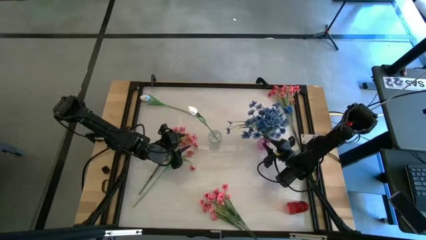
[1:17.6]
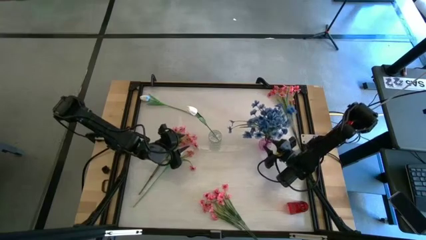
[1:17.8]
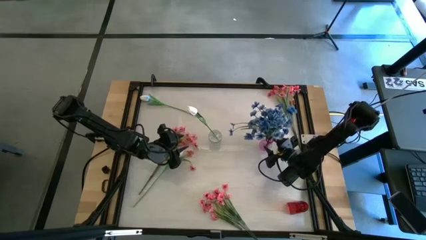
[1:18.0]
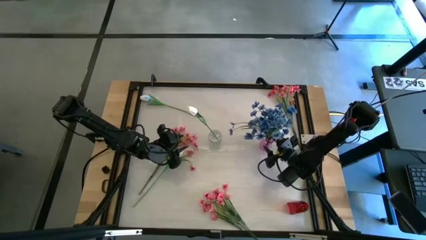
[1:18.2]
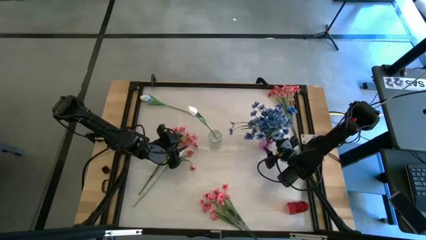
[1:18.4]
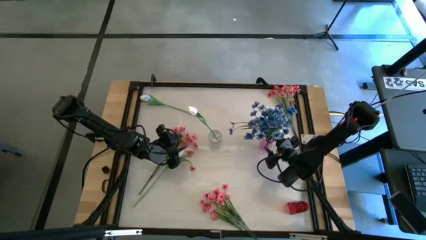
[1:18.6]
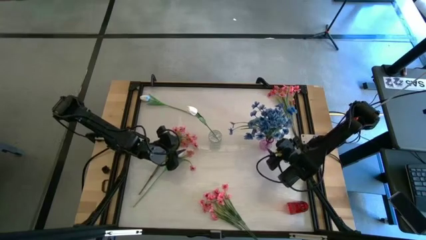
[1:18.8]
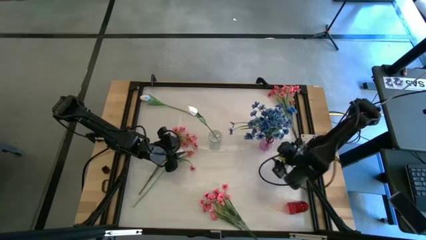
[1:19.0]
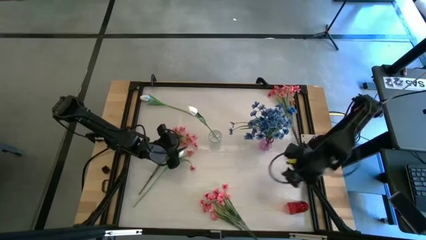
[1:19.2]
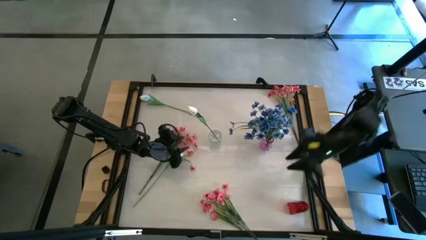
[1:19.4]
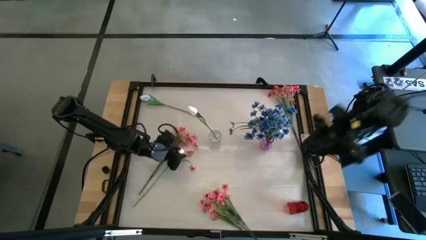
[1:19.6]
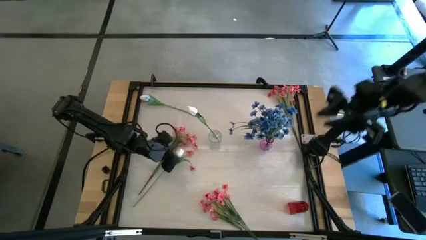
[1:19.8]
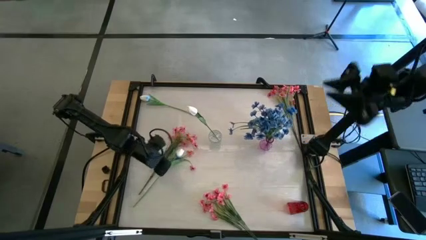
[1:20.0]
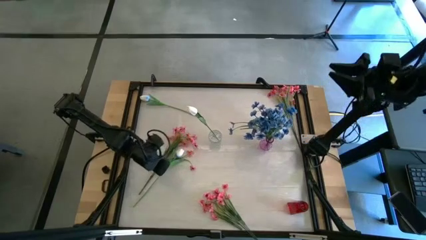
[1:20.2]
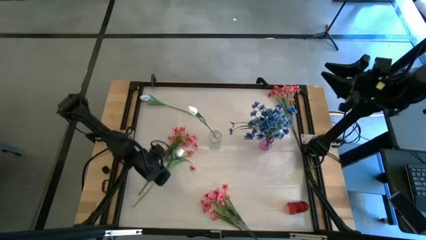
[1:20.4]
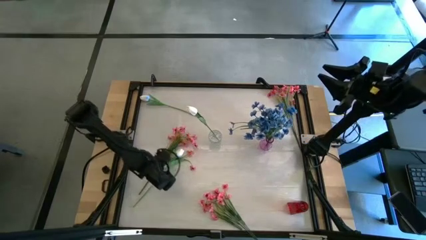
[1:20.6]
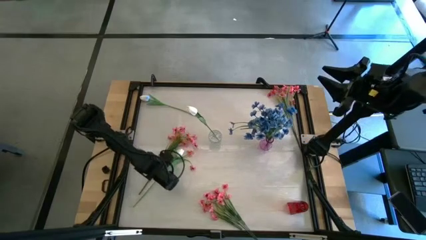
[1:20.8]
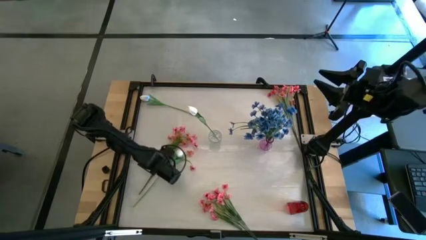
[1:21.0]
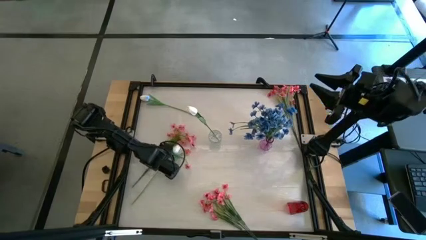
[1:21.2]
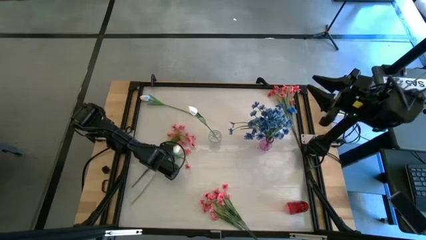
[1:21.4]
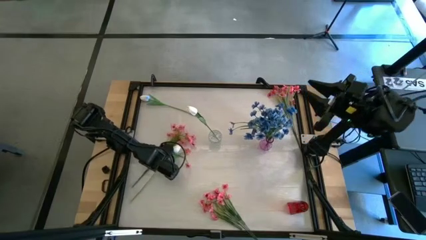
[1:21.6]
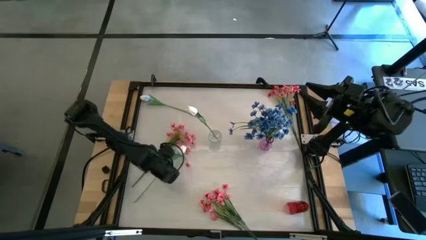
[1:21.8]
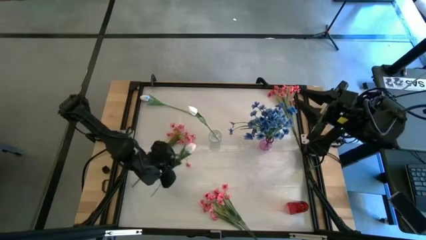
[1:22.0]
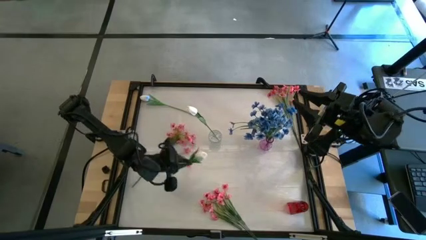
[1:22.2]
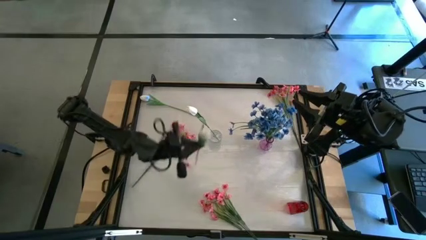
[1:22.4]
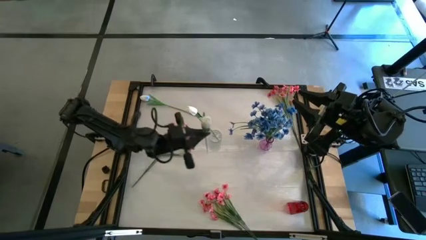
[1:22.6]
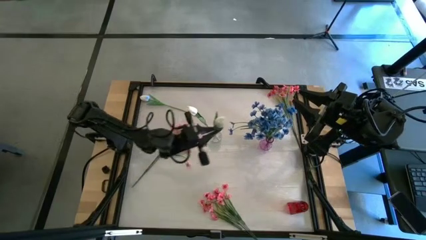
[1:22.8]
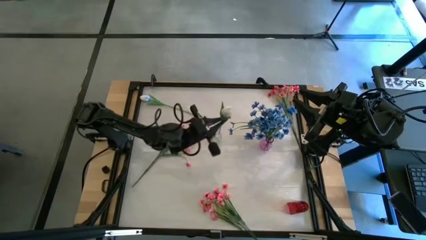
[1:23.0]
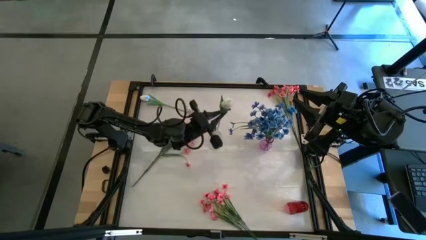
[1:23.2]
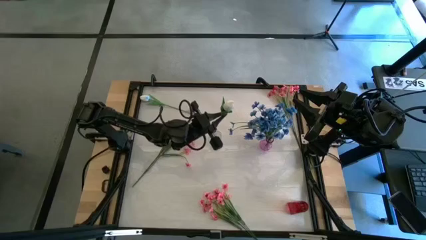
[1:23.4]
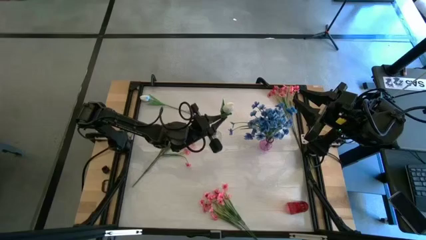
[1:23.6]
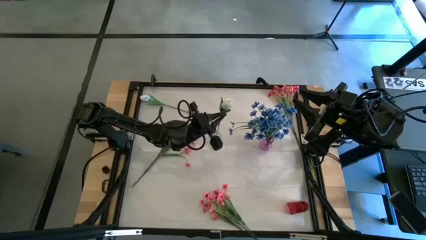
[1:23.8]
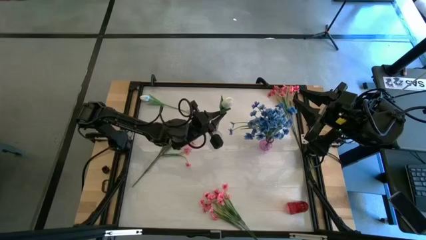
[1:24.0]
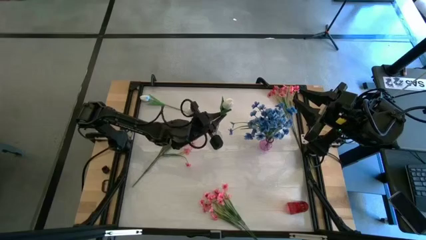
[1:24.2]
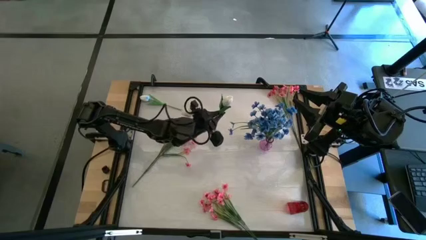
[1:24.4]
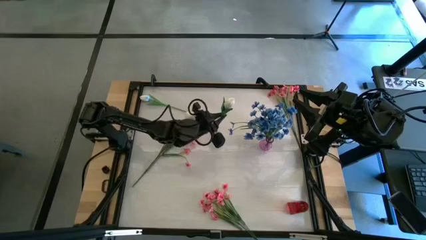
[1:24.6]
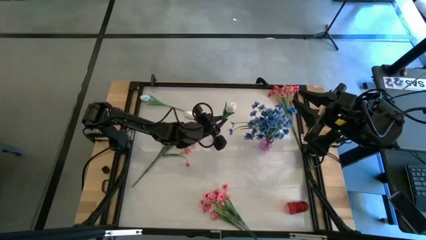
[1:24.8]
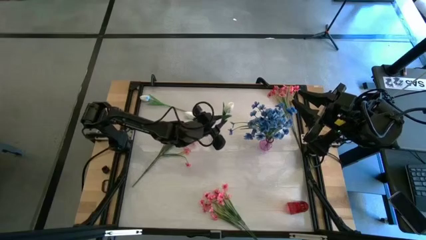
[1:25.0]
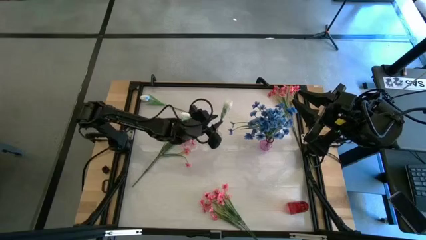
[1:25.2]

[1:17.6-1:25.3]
Task: Sort flowers into vase by color
Put the bottom white flower into the transparent vase

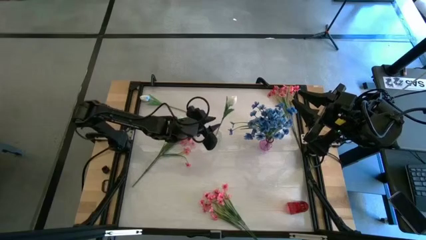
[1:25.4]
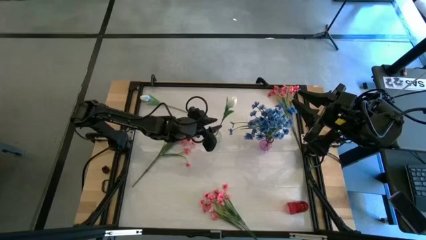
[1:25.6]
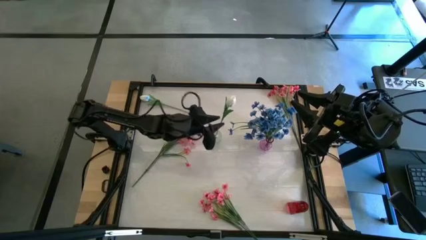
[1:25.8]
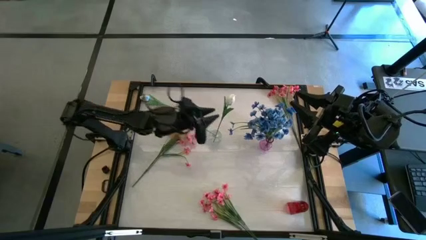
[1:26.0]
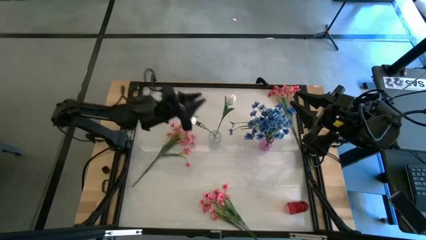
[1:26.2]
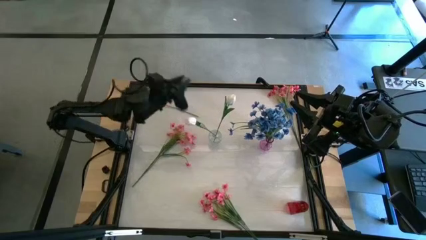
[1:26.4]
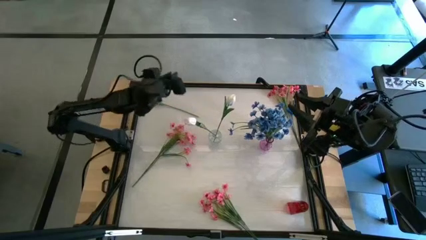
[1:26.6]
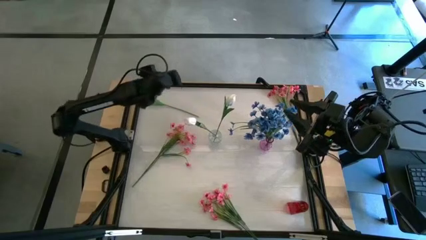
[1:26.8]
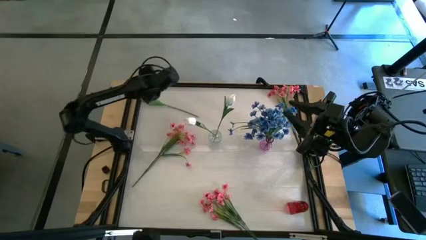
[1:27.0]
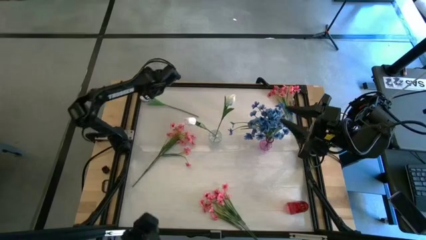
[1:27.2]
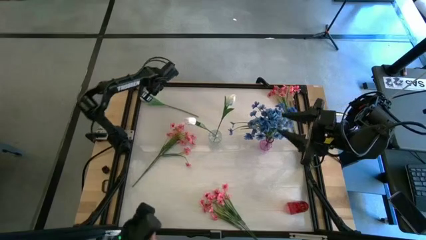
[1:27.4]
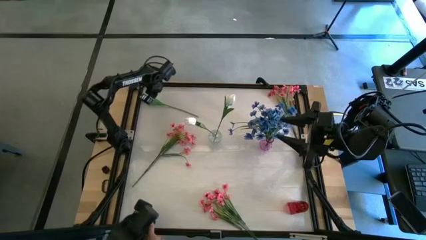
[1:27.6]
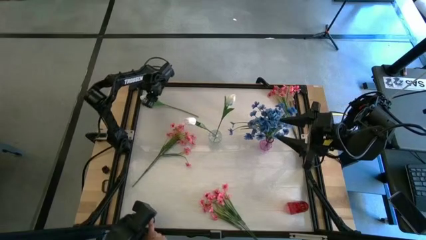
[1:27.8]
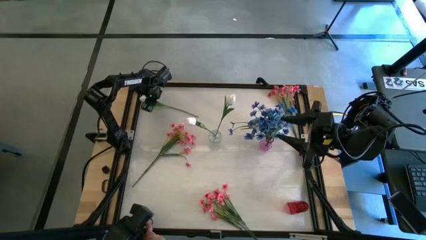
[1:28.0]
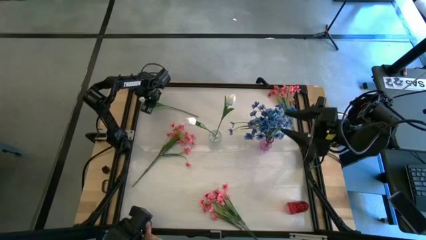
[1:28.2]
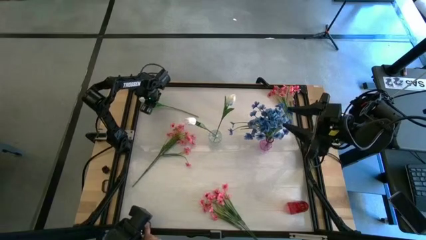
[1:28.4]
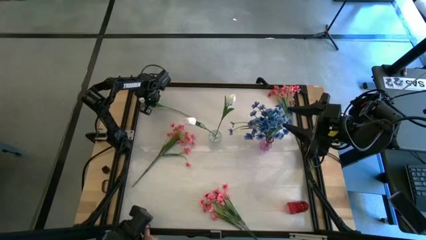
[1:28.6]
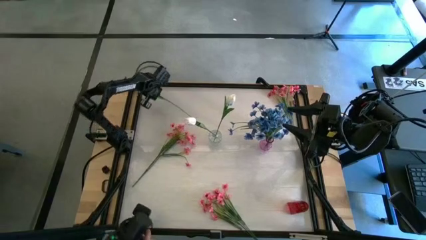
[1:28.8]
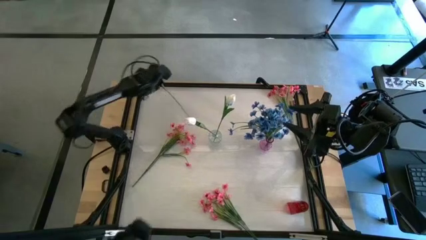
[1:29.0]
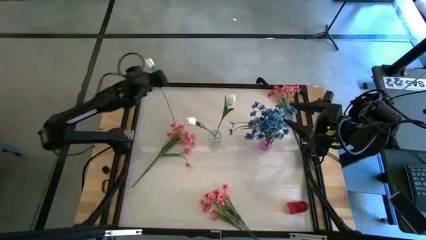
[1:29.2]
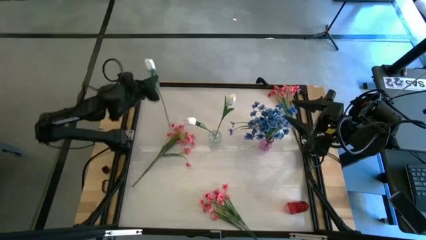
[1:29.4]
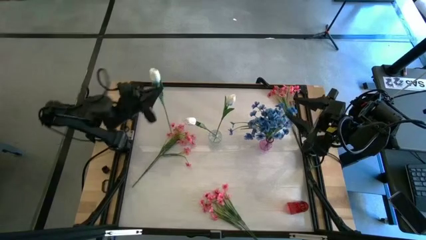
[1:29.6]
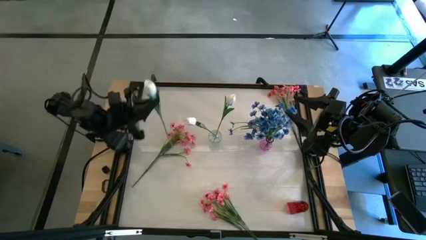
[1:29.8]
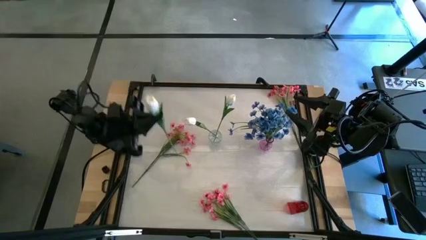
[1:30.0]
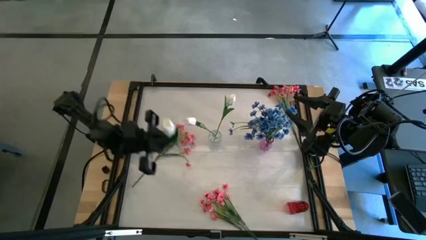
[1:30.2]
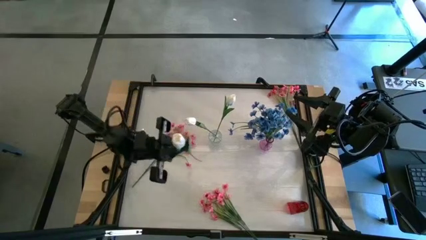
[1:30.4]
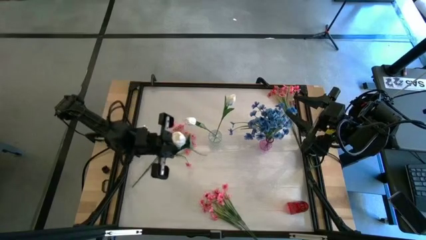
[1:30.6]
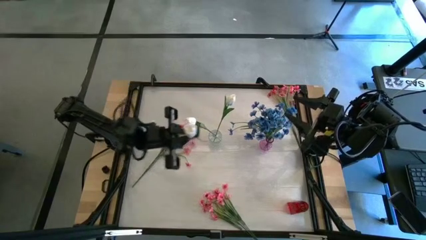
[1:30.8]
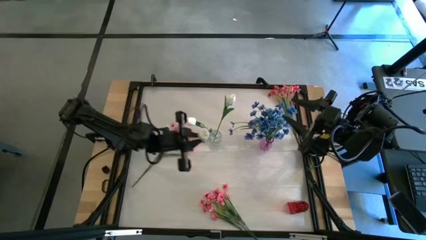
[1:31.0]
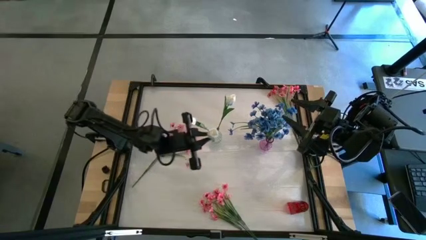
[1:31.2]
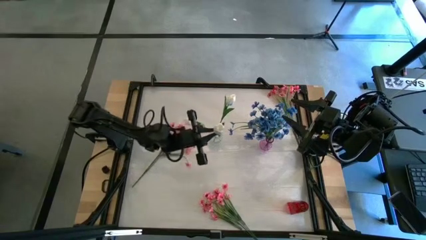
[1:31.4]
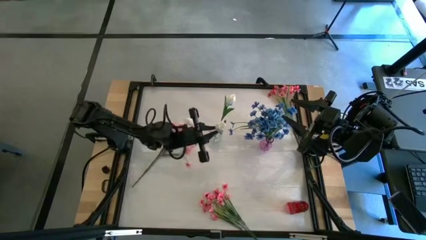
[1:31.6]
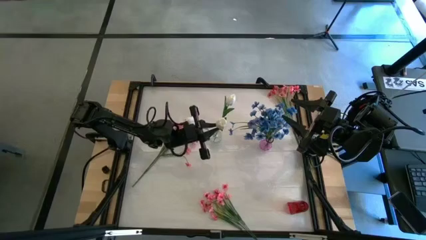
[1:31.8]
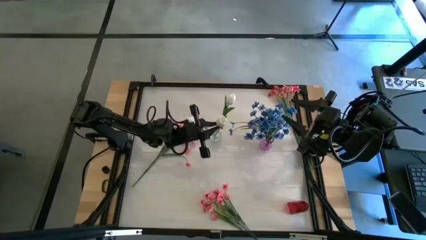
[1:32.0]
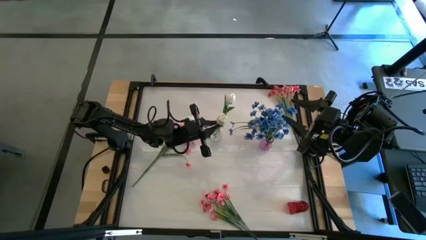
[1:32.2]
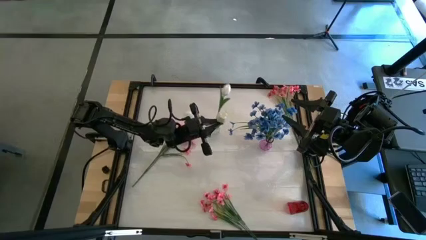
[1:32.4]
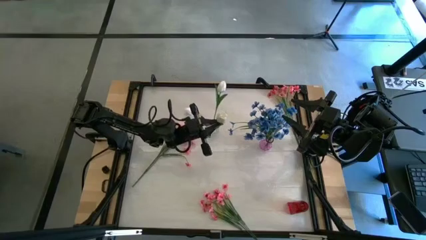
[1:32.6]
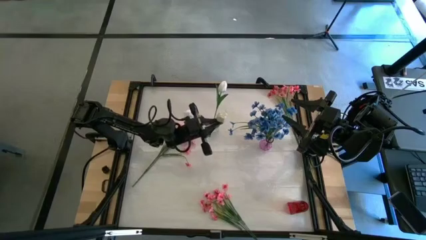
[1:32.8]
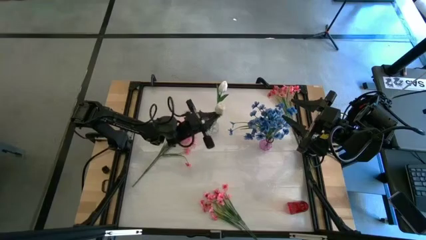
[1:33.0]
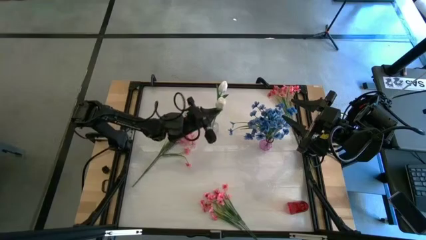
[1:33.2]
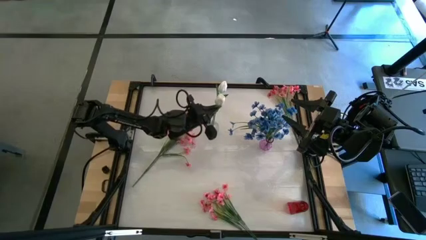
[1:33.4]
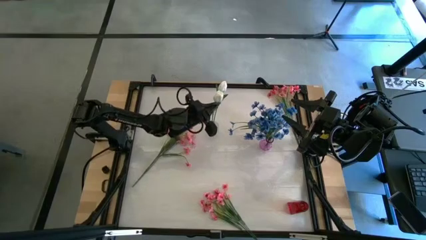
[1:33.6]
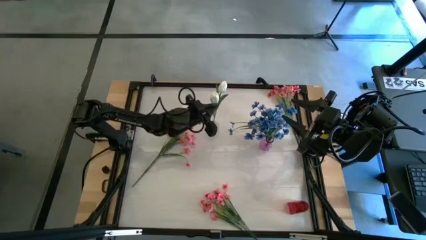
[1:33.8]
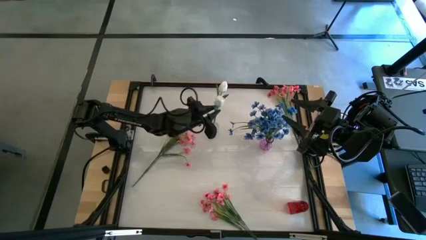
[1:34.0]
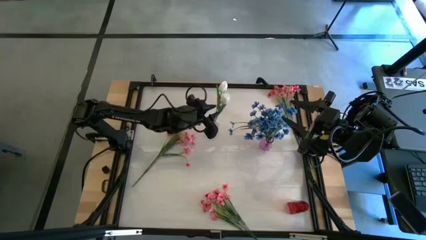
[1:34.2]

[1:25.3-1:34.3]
Put the white flower into the transparent vase
